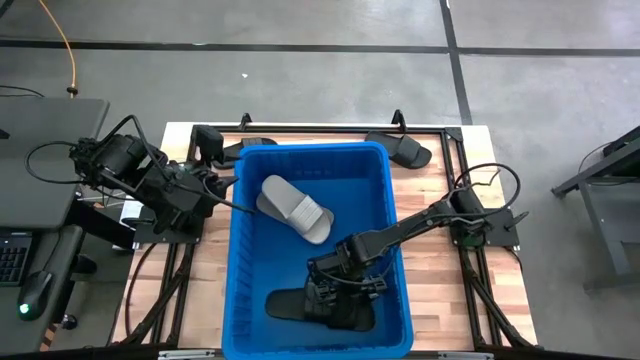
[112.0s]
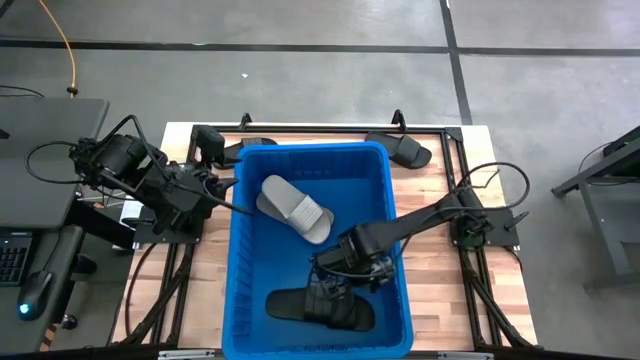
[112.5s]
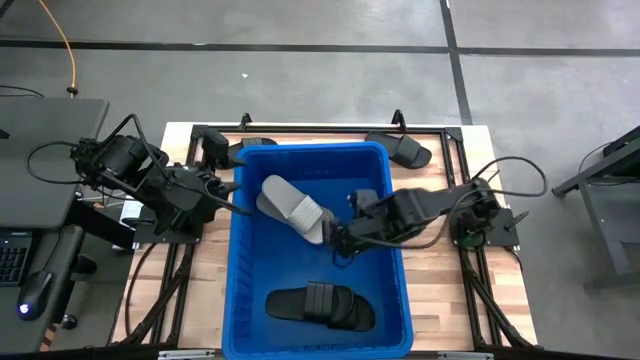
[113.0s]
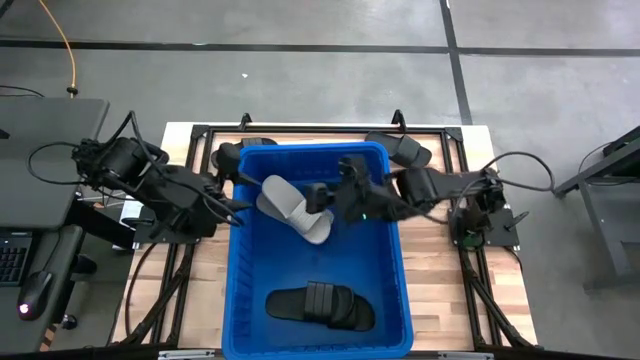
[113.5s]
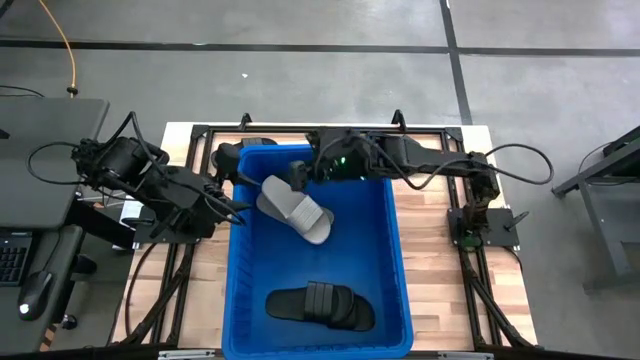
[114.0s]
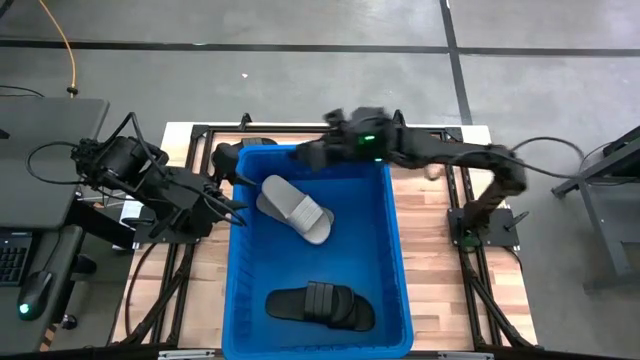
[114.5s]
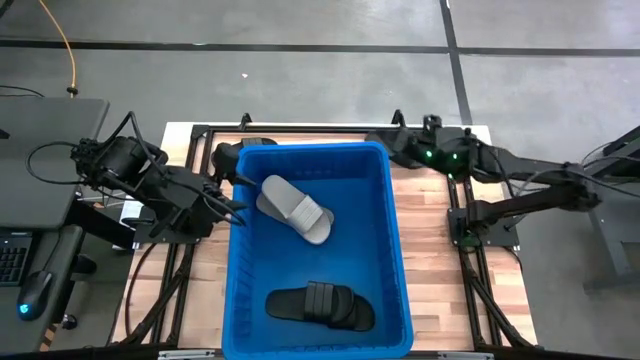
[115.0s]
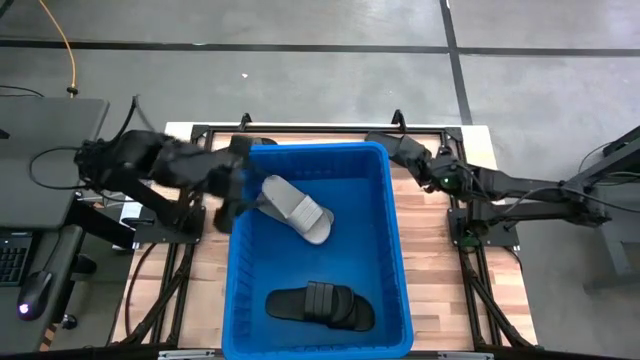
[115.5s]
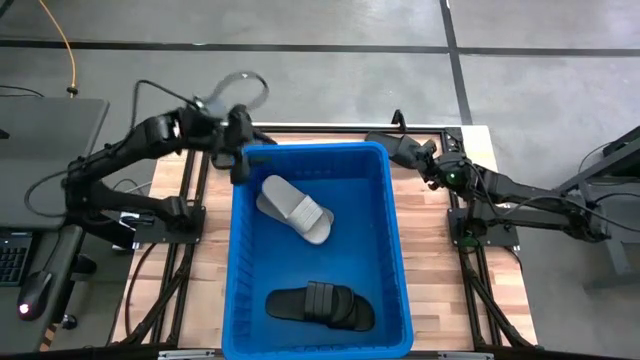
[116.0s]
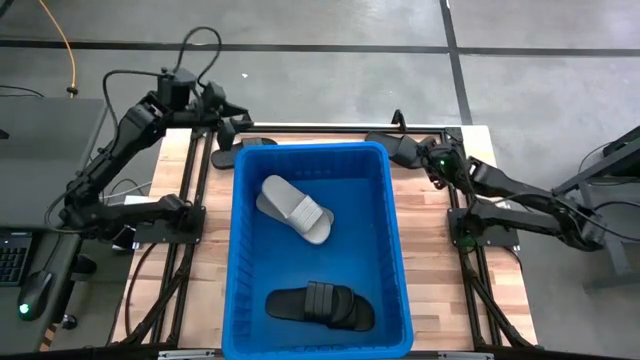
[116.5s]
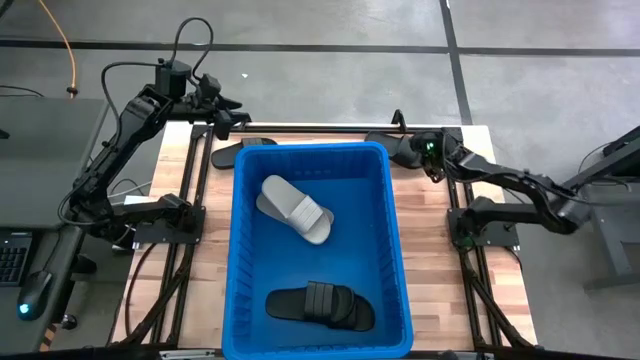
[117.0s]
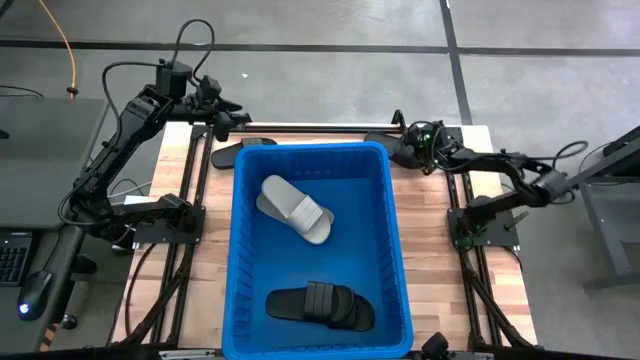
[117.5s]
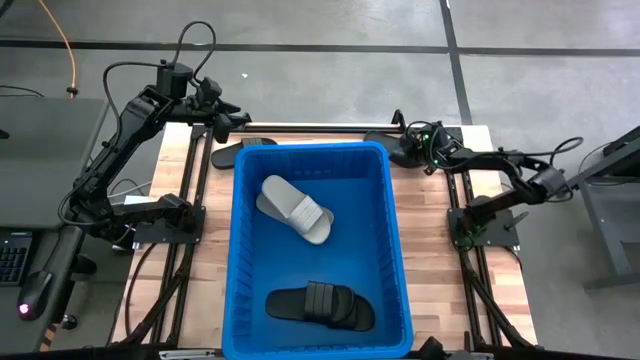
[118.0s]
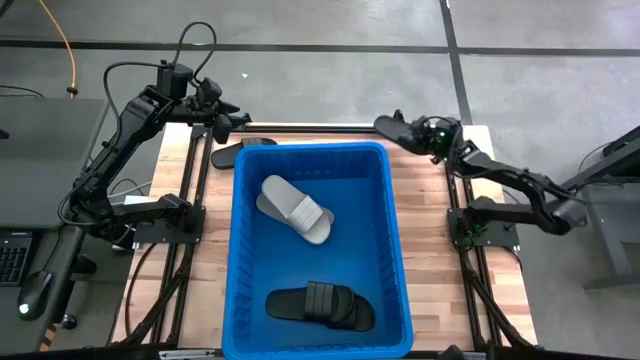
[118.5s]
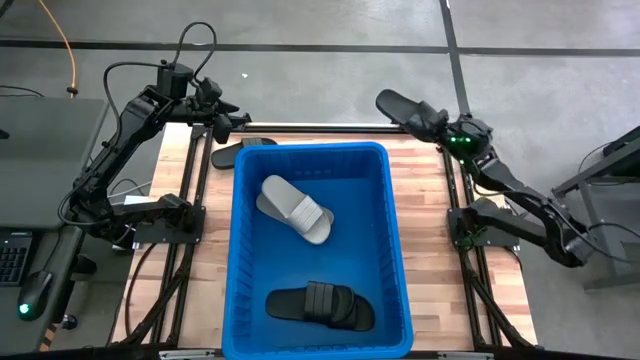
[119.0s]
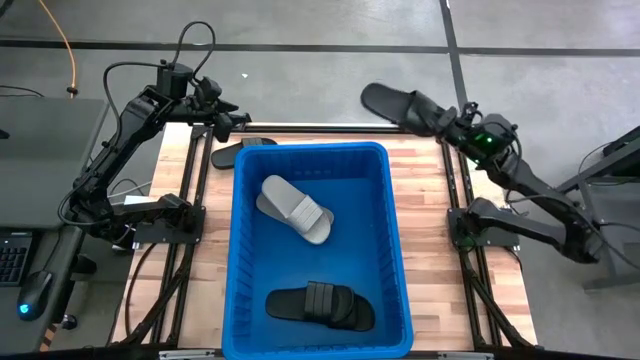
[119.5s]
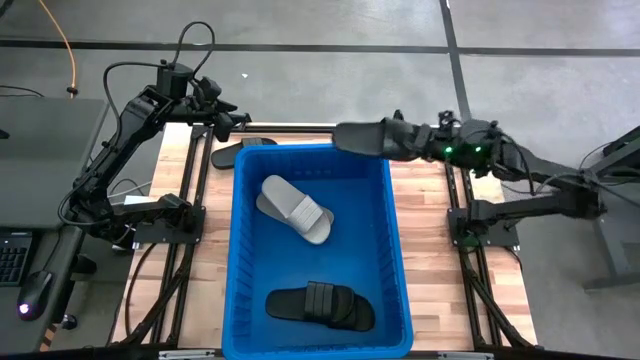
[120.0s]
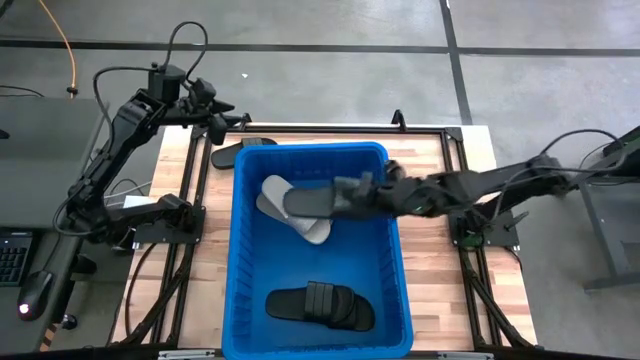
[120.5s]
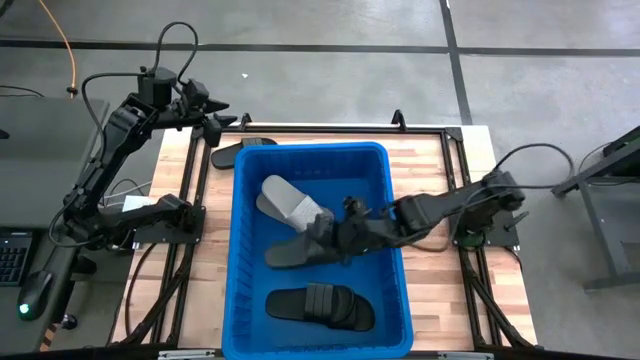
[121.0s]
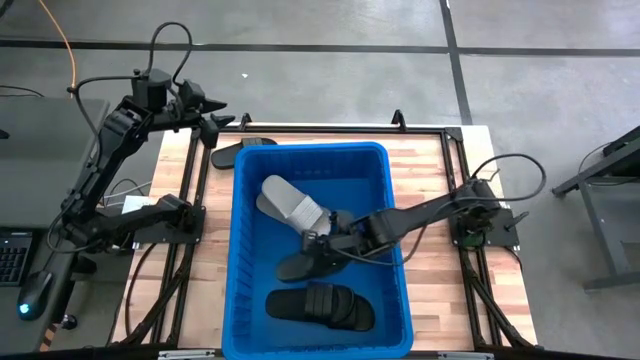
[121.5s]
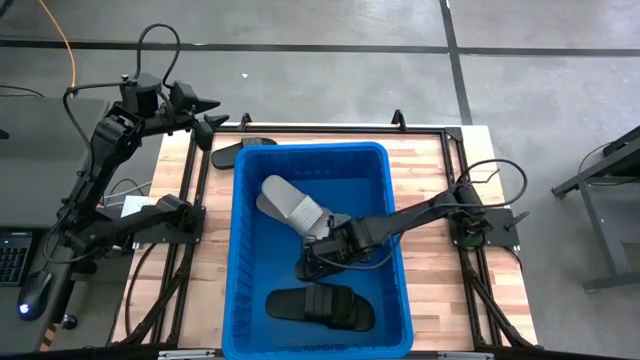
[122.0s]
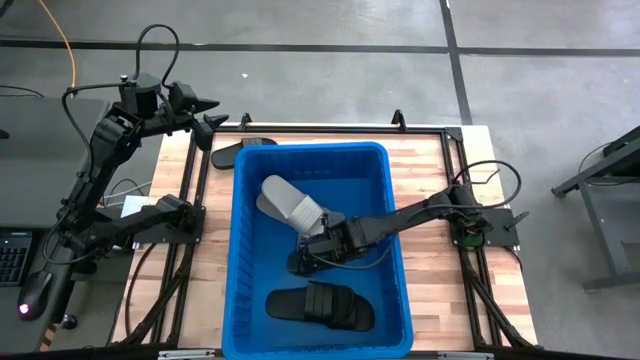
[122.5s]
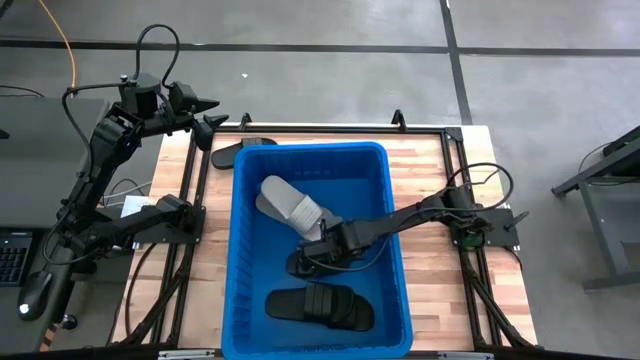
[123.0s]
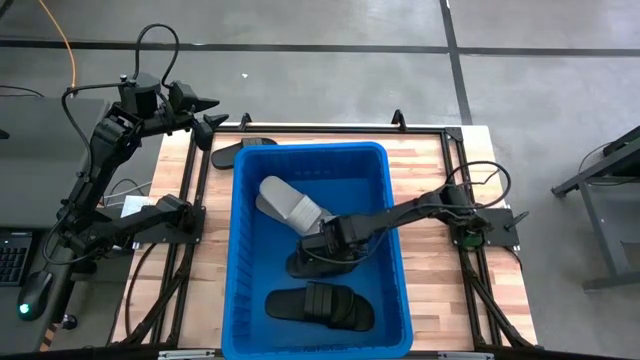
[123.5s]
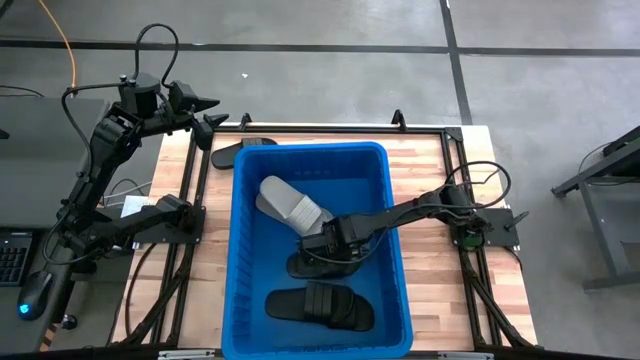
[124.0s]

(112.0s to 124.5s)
Task: Pick and place slides into bin
Put the right black slipper into the blue bin

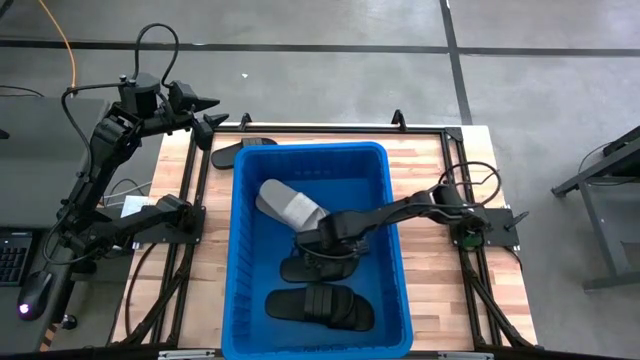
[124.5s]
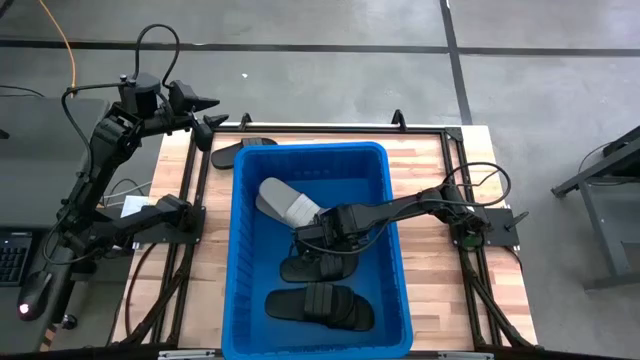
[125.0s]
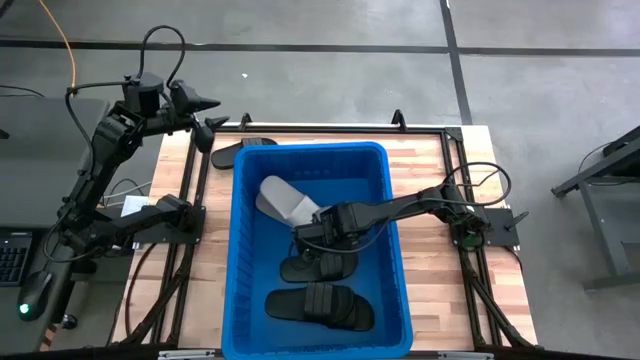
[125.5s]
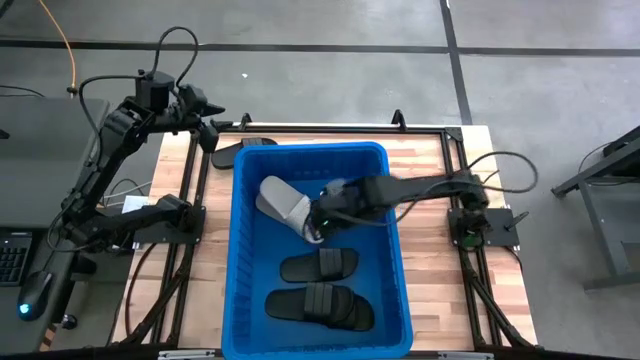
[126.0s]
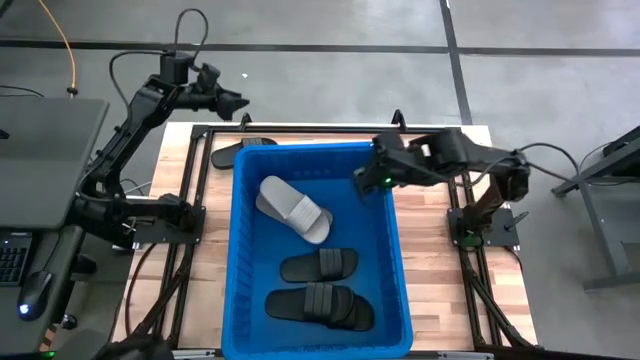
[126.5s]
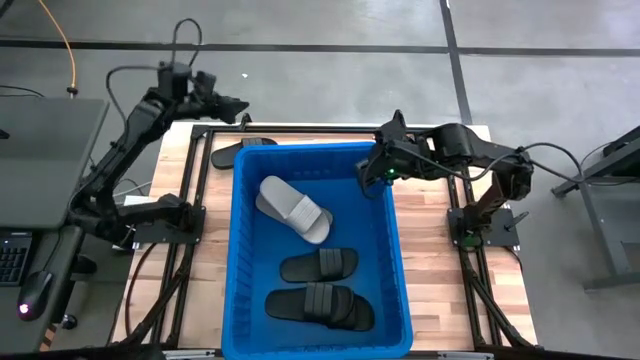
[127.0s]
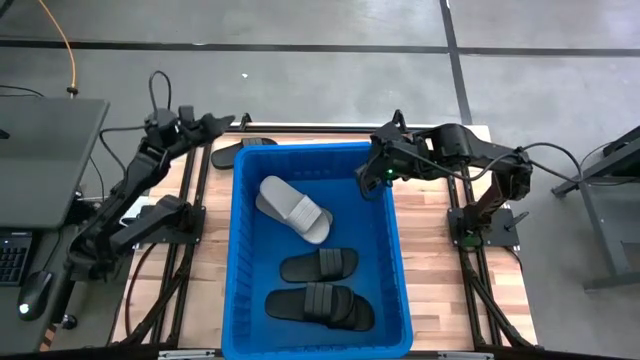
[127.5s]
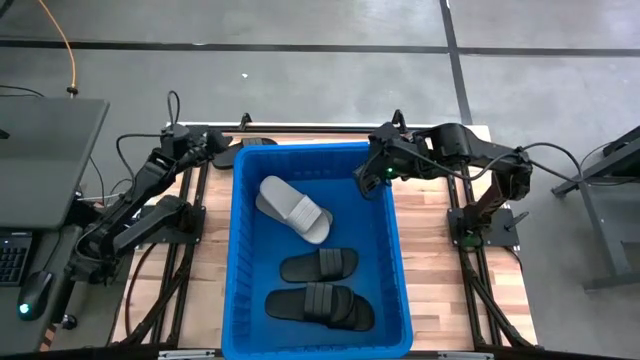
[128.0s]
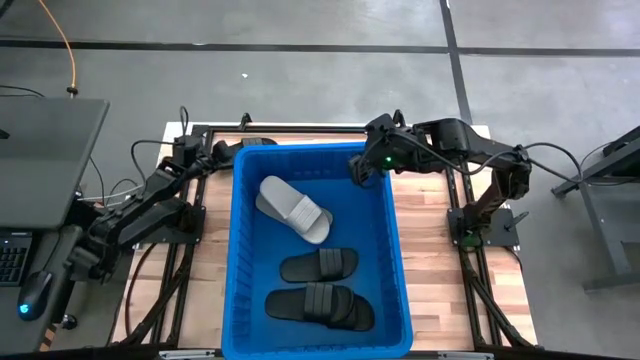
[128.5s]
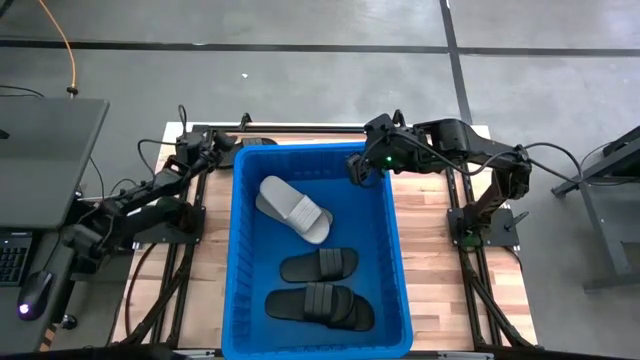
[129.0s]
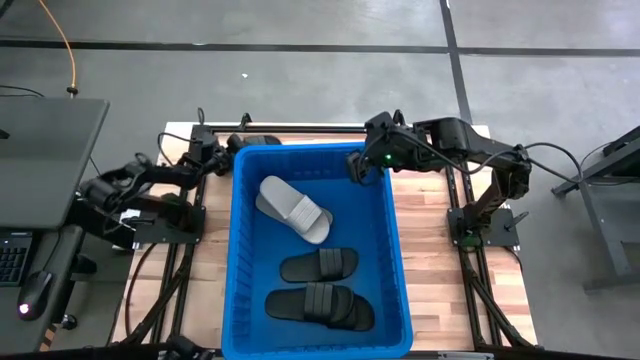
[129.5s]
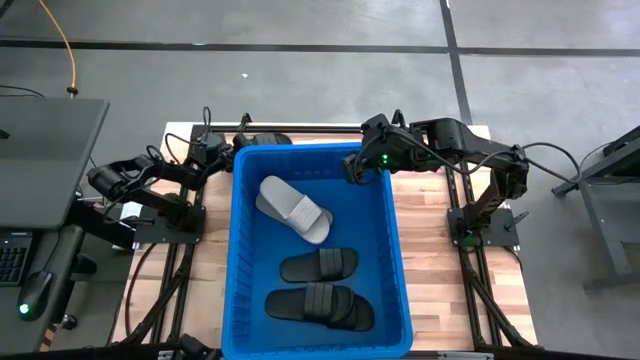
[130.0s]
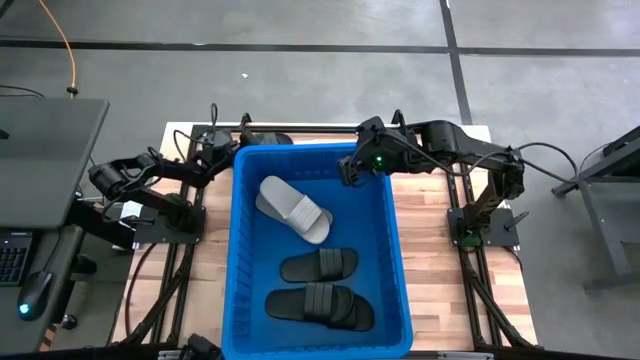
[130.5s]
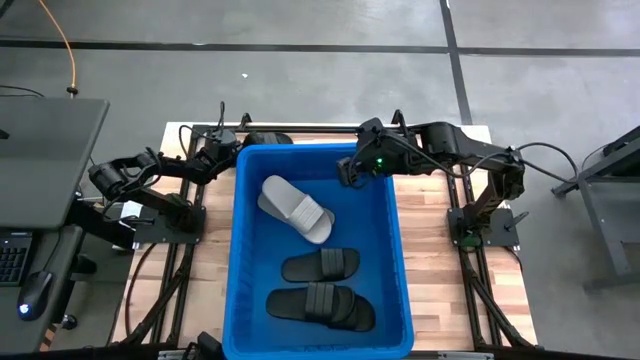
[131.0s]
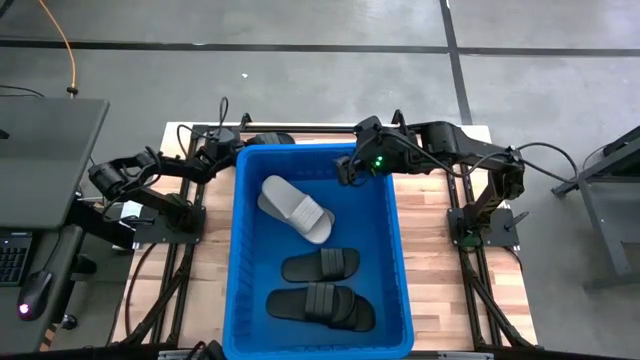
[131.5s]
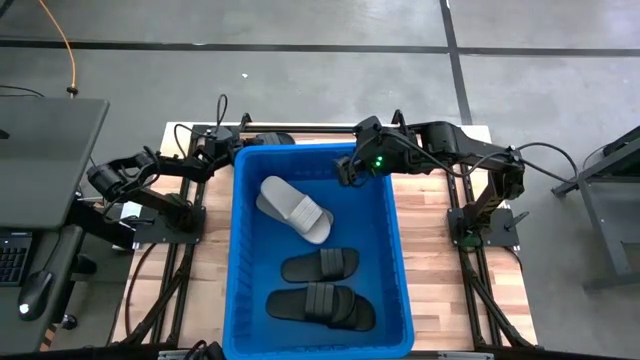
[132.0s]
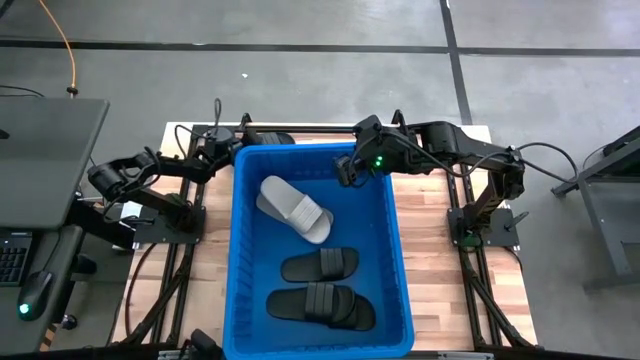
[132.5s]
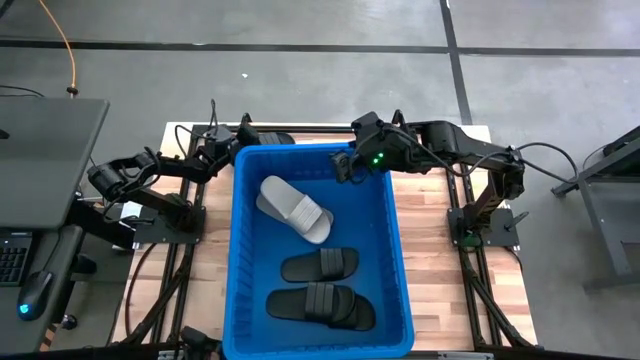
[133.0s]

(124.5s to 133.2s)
Put the black slipper into the blue bin
